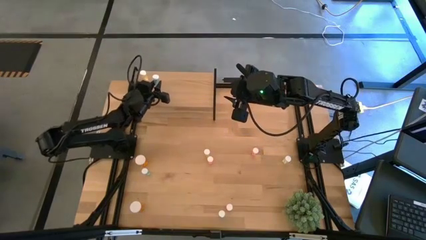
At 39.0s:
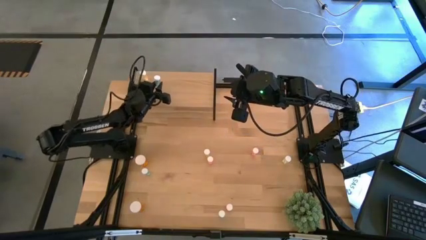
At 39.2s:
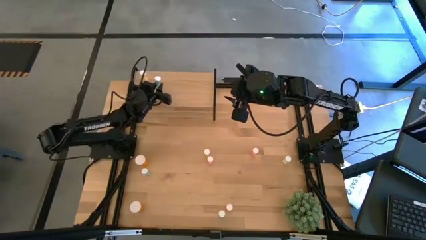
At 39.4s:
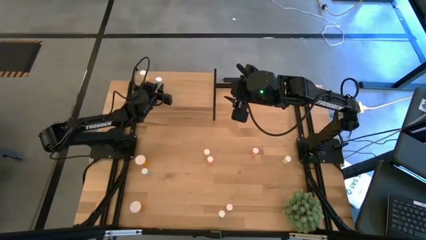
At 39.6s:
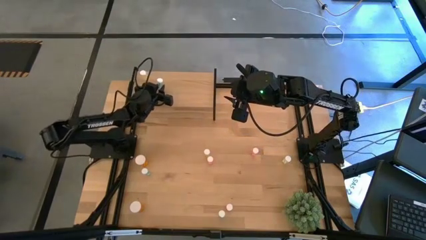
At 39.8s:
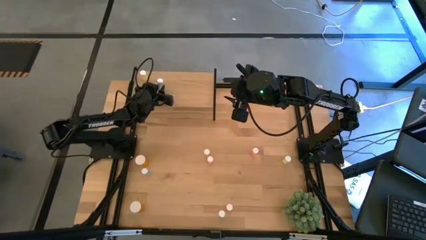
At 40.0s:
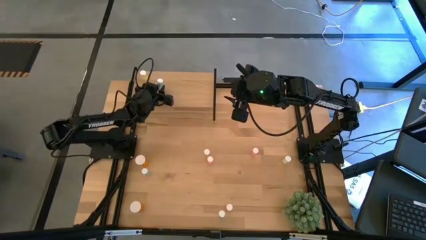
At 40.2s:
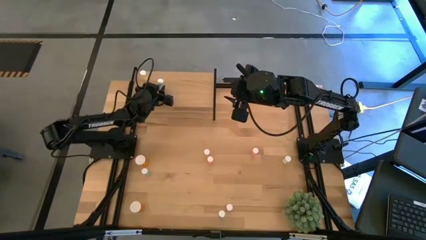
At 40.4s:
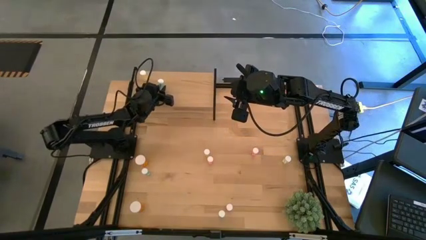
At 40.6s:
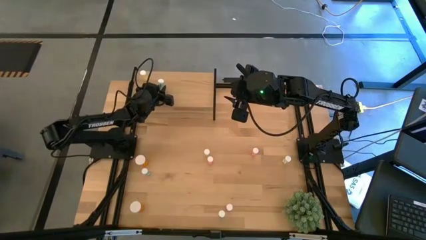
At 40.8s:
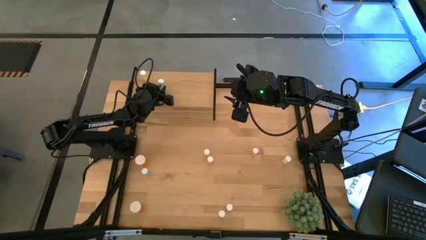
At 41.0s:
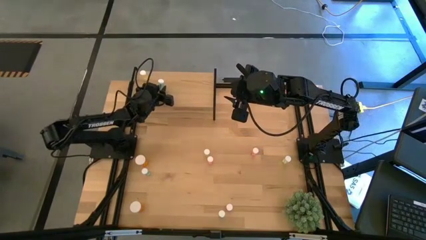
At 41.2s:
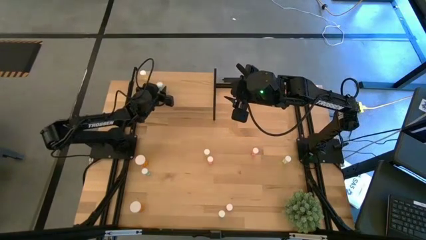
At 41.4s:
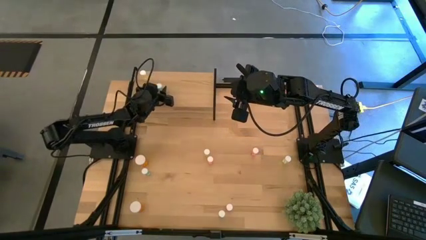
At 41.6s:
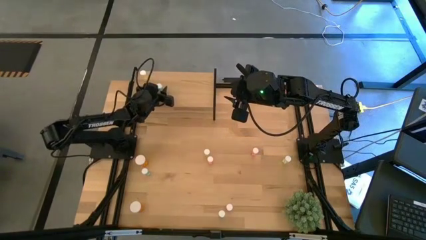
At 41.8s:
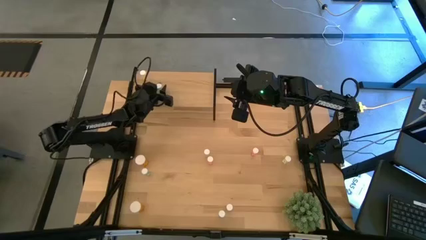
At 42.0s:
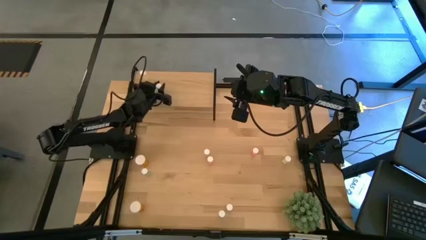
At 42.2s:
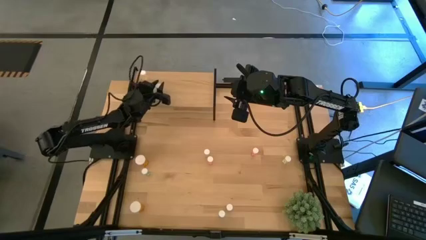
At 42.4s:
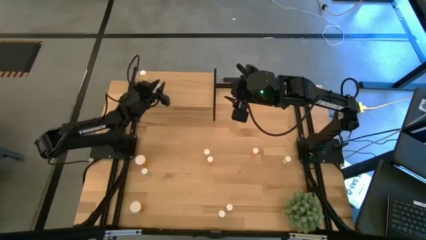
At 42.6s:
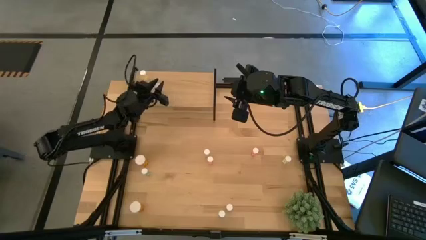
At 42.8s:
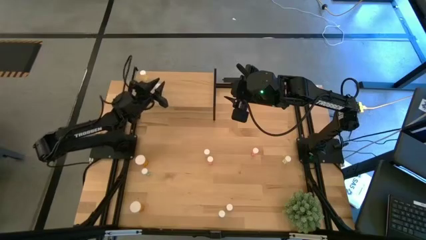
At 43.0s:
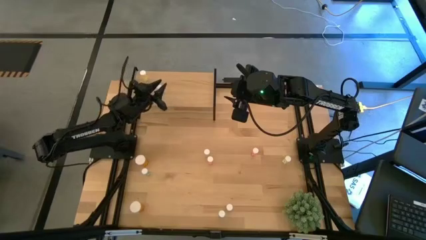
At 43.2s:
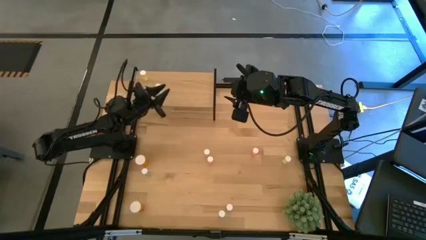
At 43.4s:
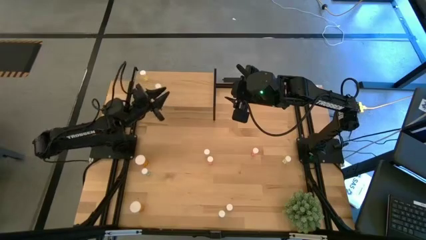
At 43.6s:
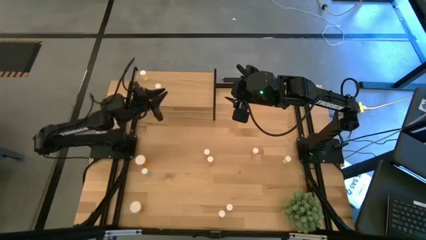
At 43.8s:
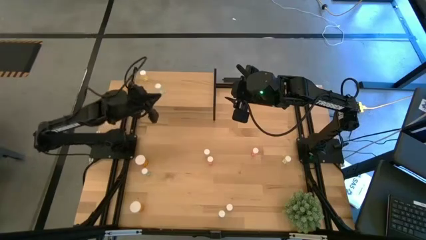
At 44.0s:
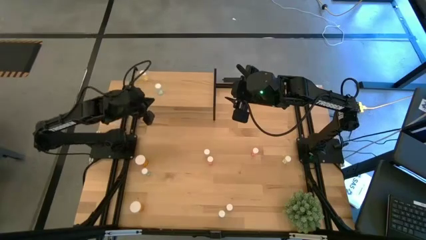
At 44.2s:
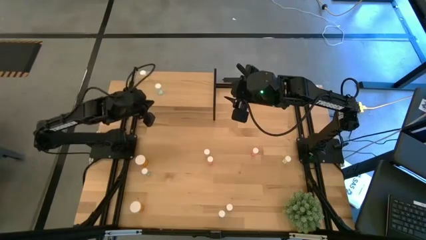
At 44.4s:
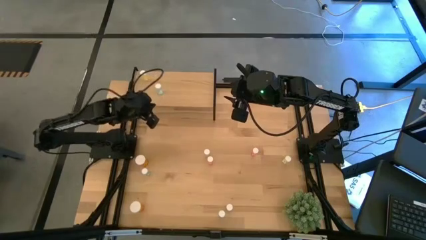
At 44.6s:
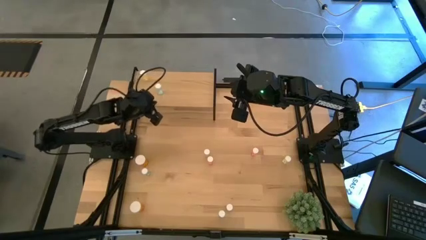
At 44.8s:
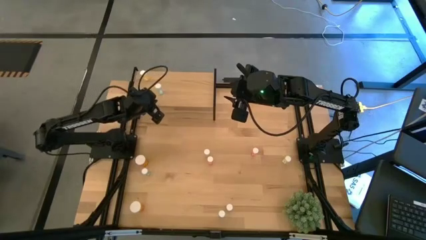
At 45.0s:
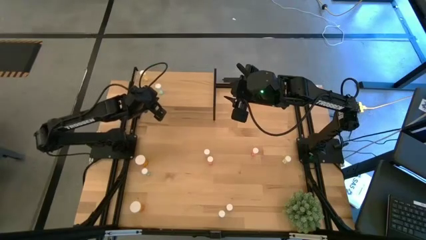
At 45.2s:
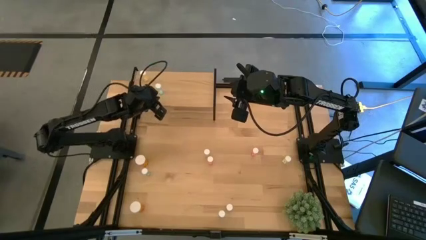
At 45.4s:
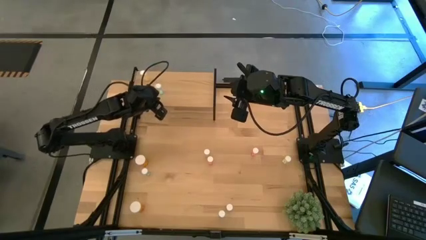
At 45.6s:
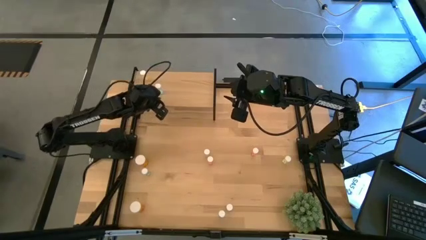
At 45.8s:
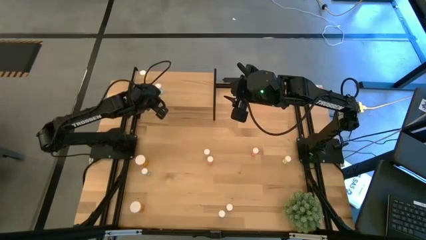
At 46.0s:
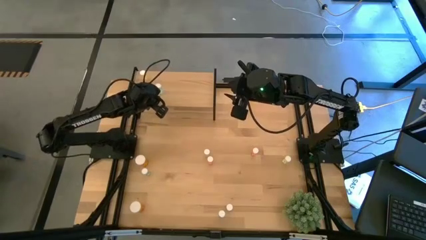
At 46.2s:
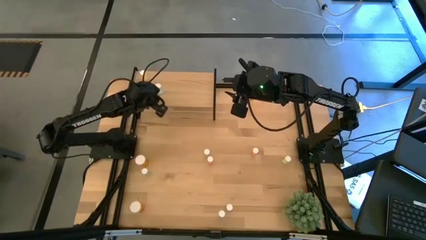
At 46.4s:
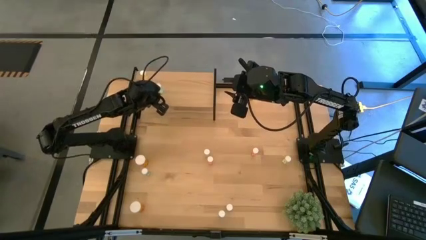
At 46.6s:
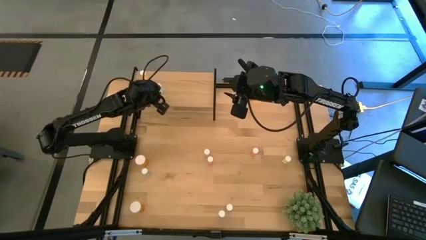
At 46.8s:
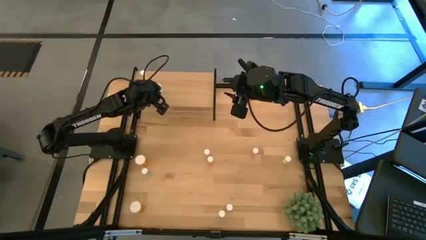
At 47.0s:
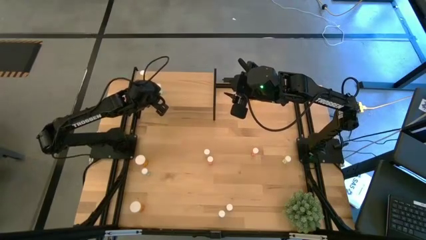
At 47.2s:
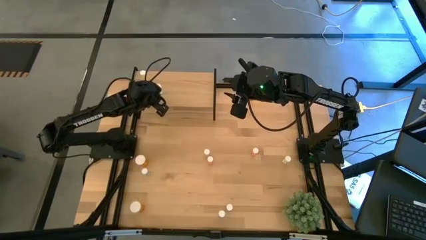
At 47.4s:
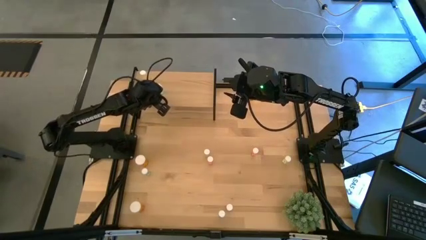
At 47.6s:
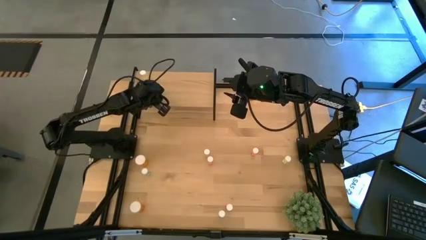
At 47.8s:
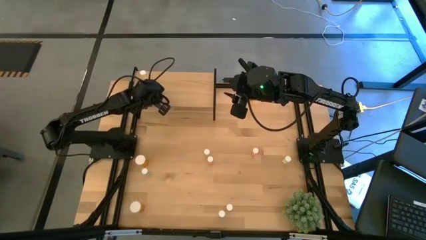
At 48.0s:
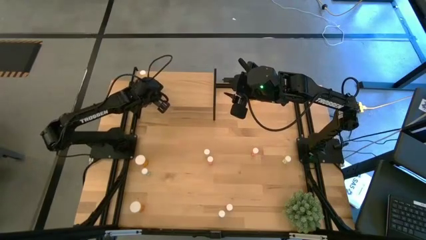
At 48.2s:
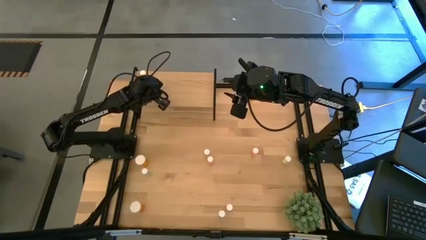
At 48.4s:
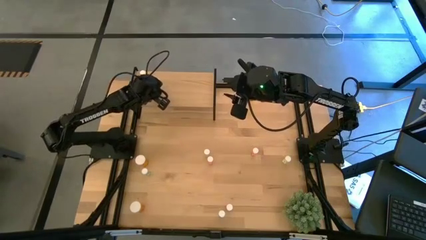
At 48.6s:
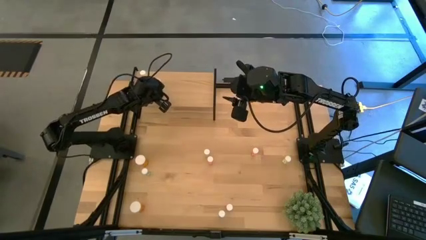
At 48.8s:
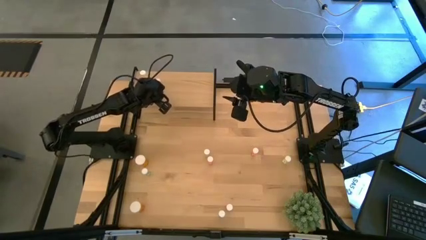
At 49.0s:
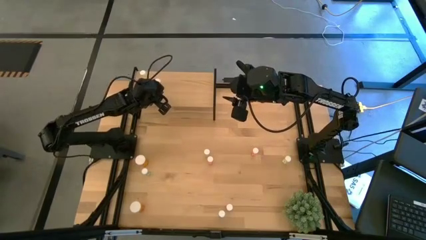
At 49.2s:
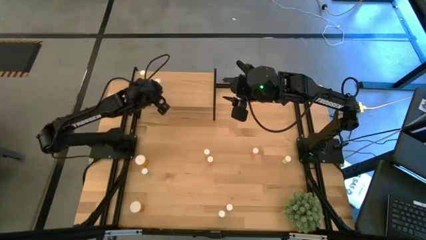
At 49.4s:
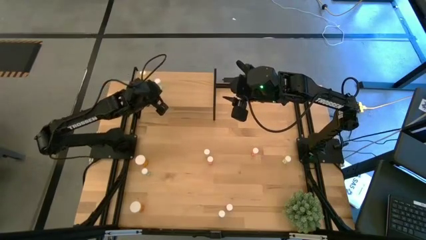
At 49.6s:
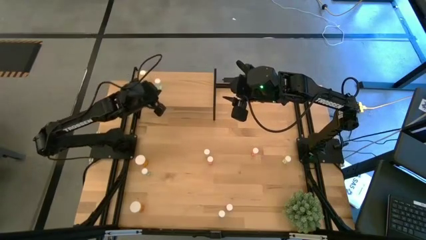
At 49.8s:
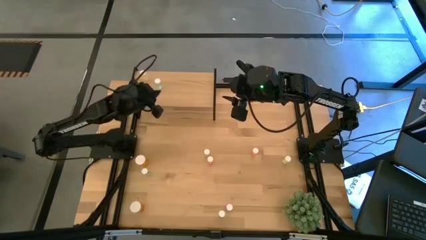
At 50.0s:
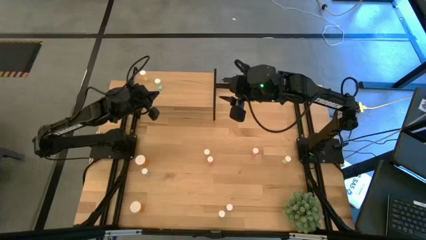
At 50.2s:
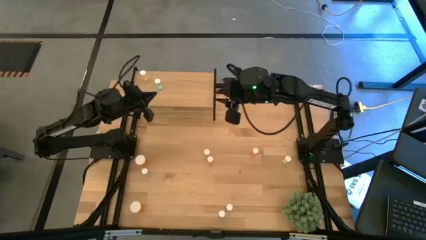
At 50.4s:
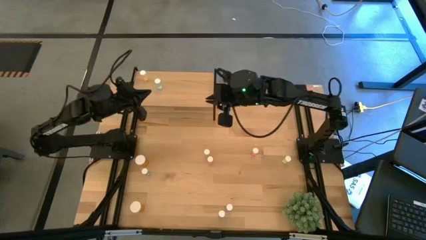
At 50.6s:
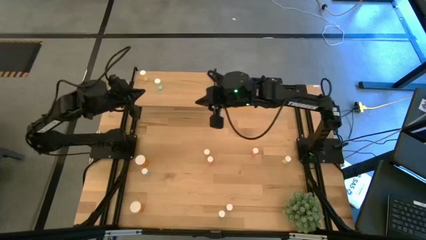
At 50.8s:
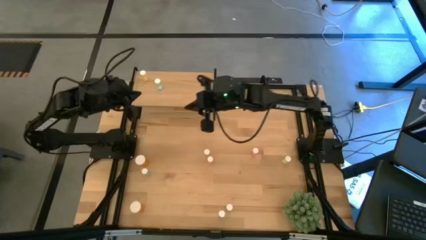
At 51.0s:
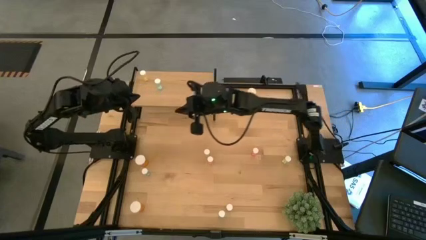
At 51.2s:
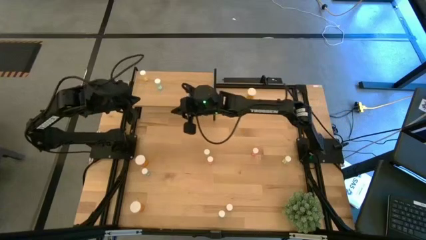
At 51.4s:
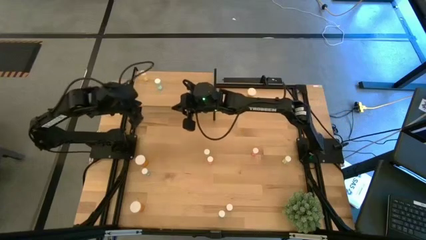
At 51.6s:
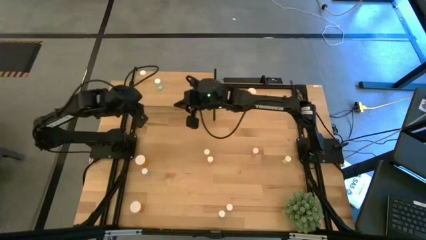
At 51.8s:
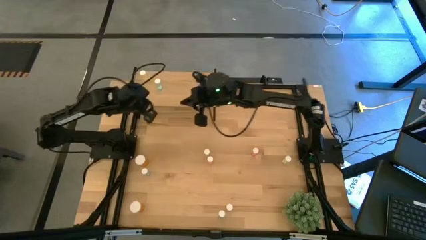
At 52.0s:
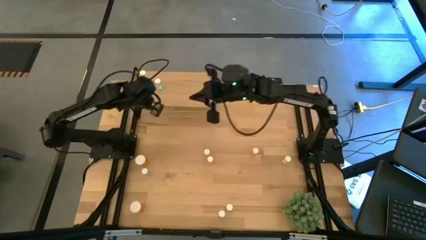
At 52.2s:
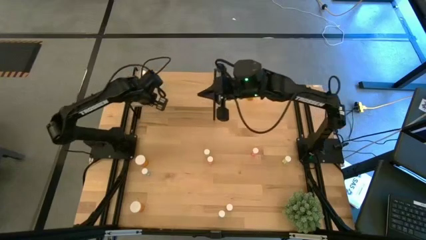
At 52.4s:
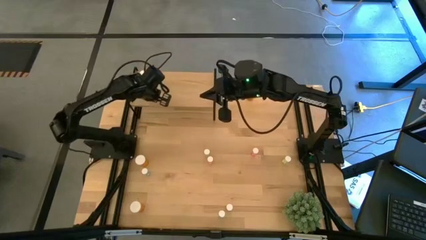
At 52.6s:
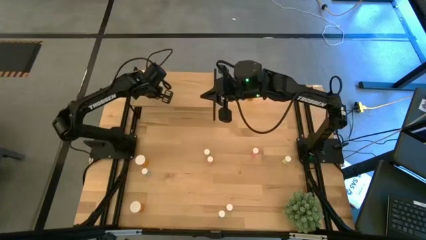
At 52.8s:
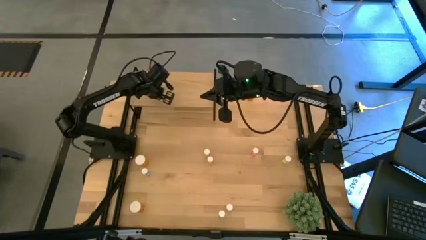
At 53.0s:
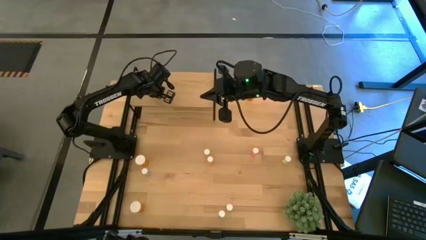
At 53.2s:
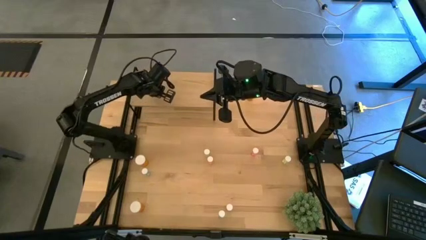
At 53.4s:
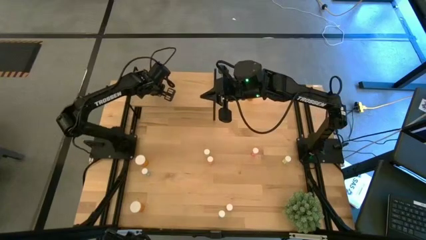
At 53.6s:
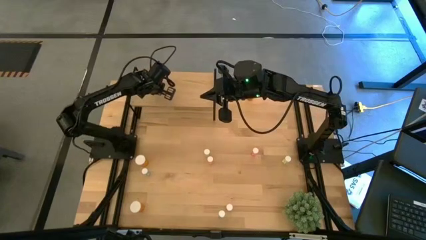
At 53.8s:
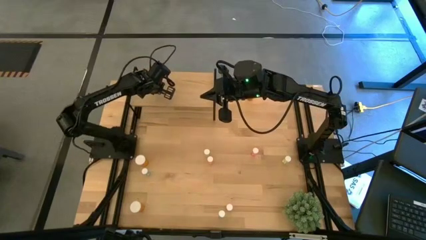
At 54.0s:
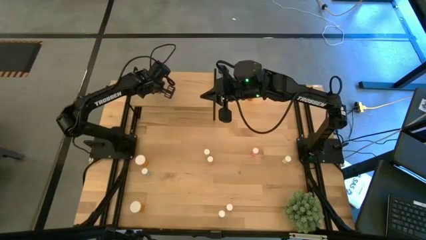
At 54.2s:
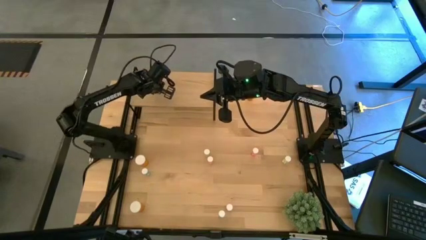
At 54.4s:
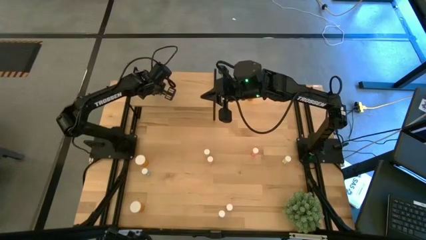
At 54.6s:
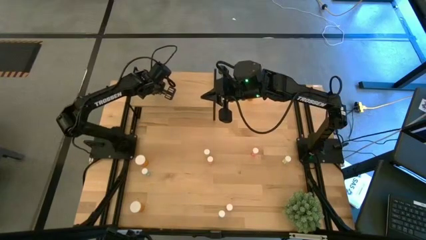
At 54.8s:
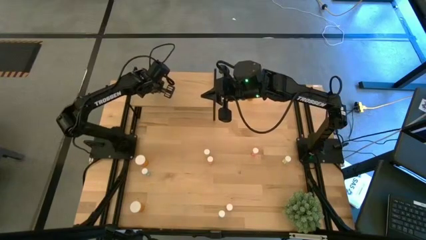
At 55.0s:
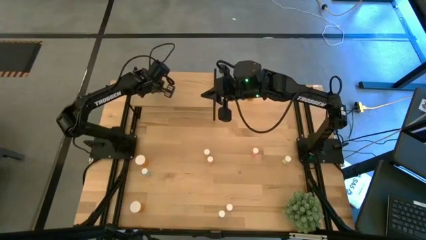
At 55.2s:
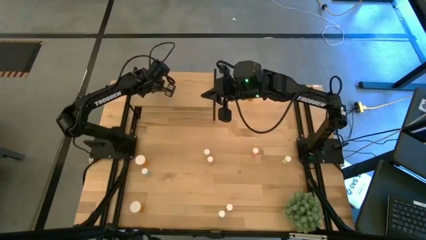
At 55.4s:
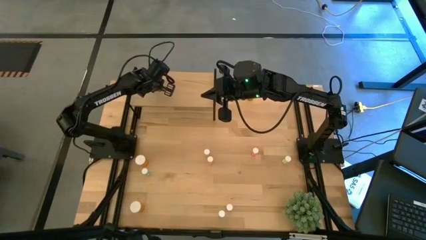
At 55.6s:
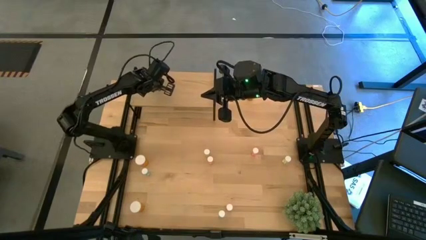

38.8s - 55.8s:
Task: Pick and place medicine bottles onto shelf by color
Put the top right small blue pill on the shelf
